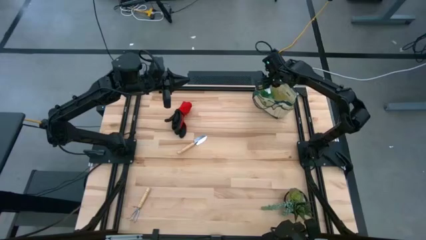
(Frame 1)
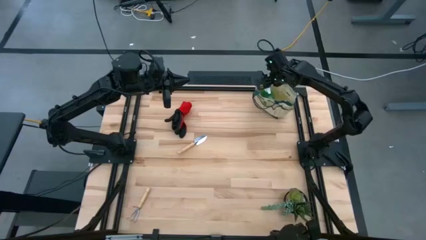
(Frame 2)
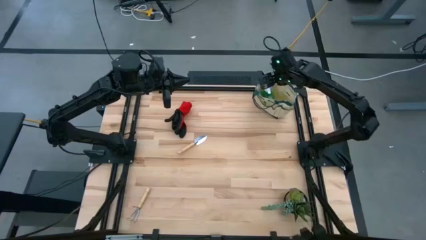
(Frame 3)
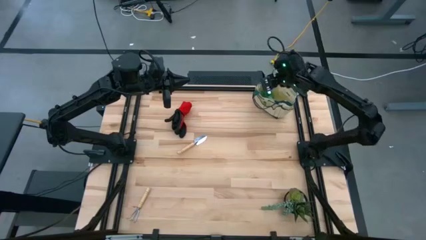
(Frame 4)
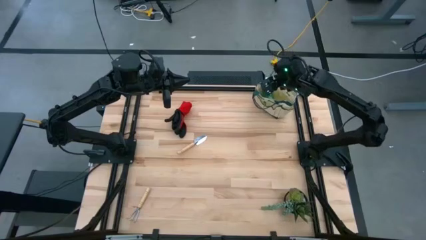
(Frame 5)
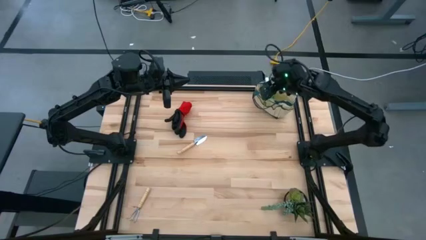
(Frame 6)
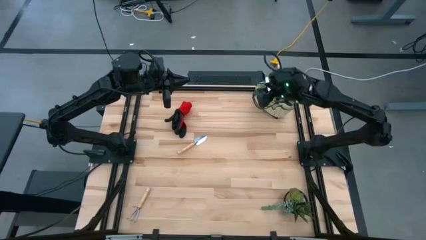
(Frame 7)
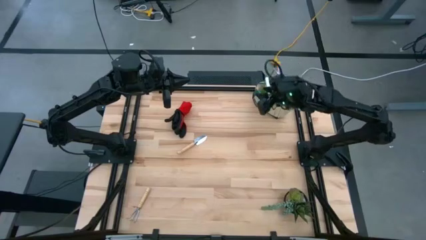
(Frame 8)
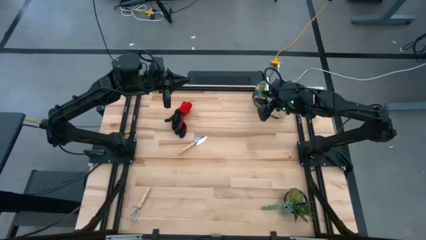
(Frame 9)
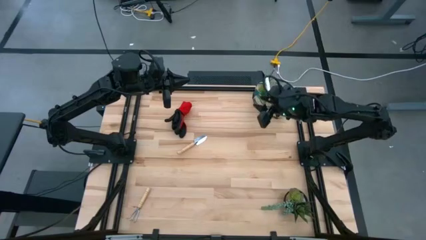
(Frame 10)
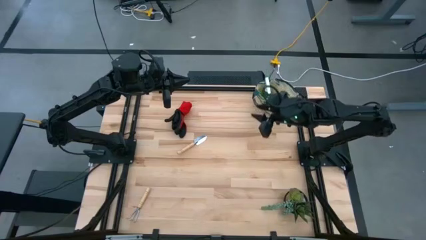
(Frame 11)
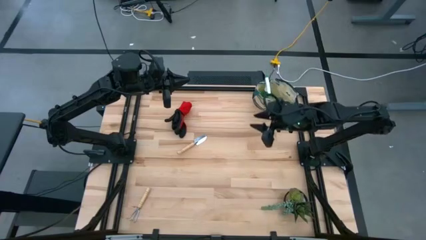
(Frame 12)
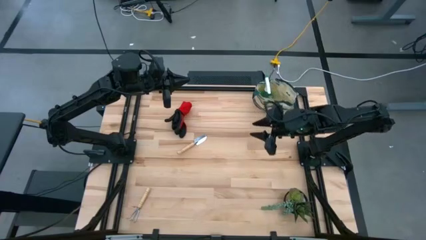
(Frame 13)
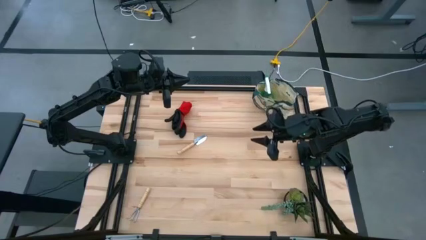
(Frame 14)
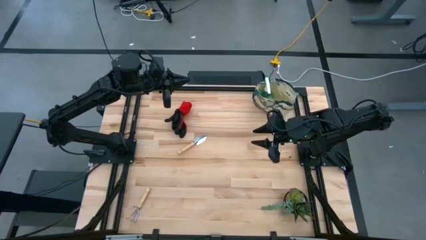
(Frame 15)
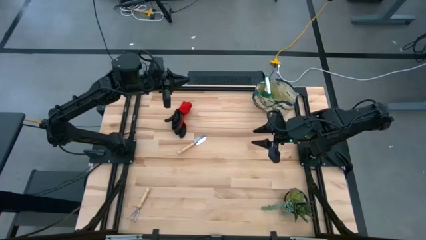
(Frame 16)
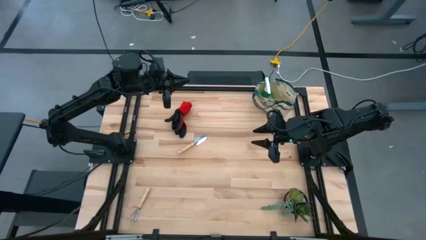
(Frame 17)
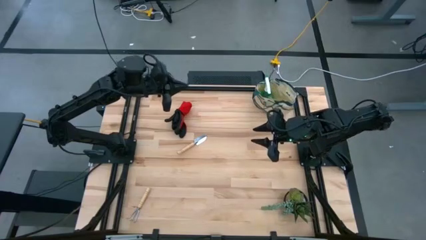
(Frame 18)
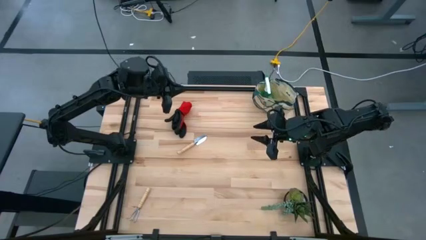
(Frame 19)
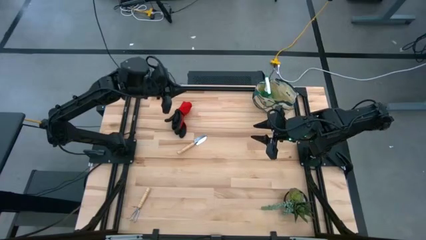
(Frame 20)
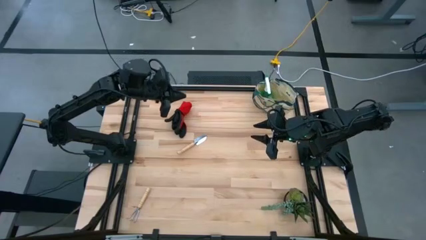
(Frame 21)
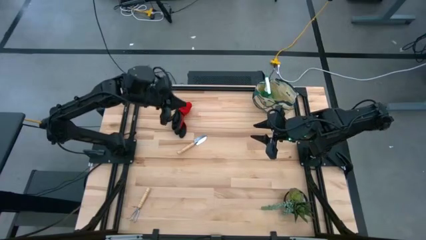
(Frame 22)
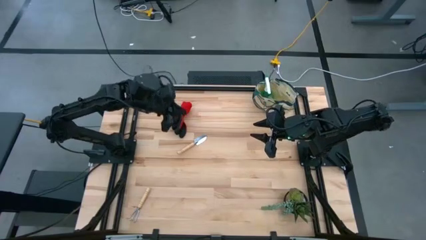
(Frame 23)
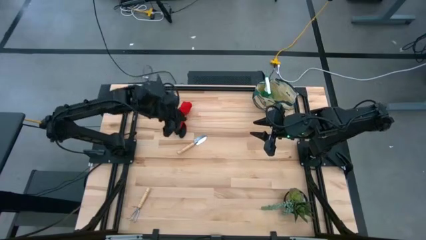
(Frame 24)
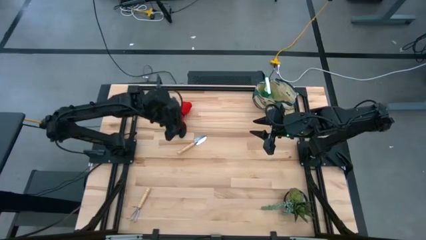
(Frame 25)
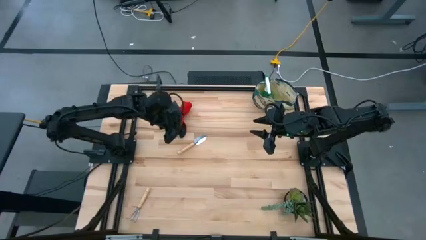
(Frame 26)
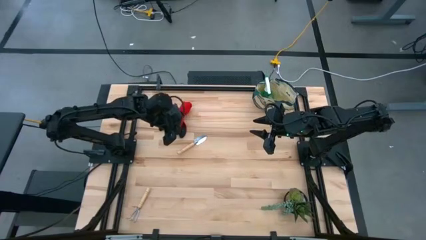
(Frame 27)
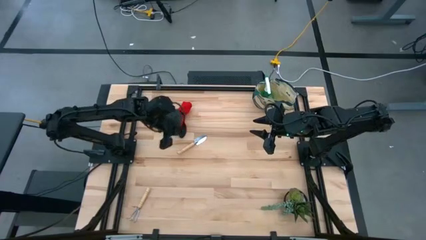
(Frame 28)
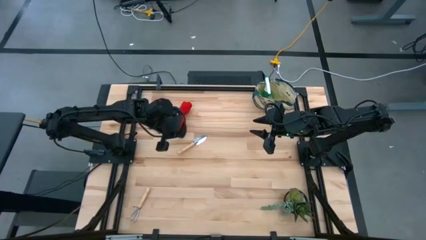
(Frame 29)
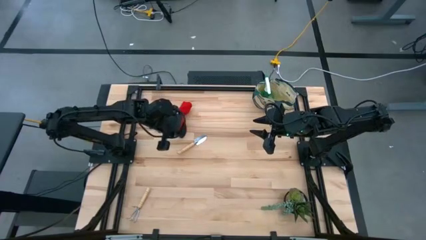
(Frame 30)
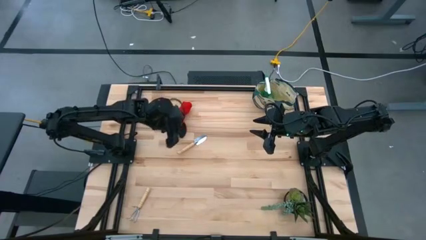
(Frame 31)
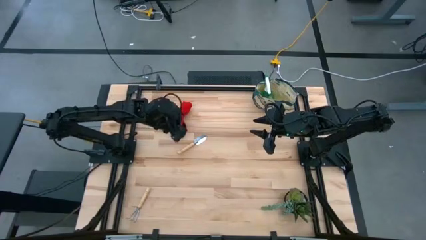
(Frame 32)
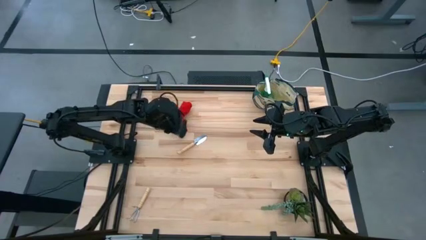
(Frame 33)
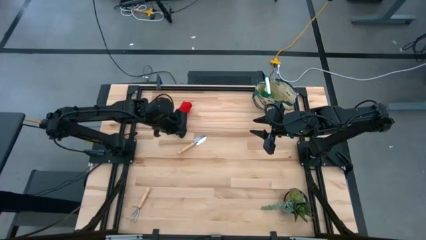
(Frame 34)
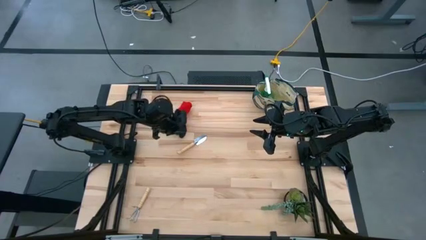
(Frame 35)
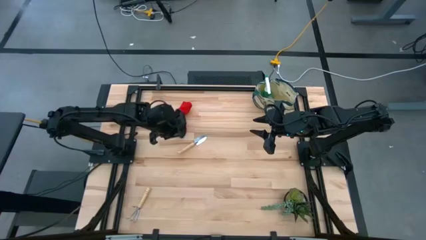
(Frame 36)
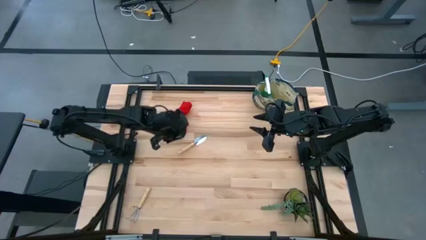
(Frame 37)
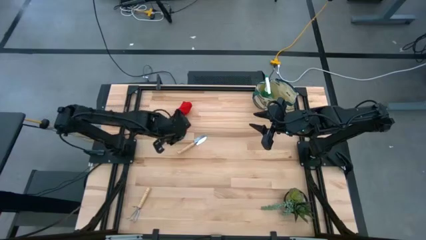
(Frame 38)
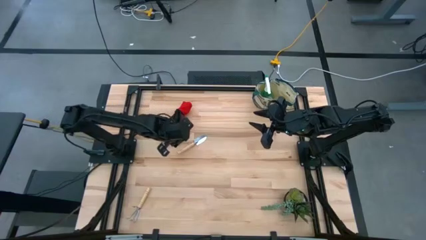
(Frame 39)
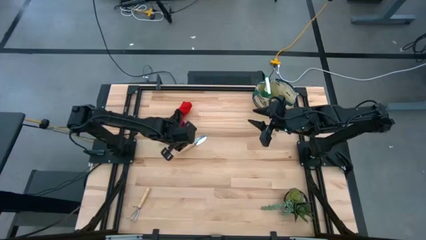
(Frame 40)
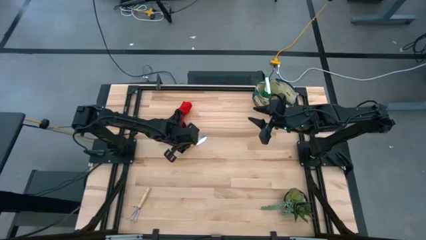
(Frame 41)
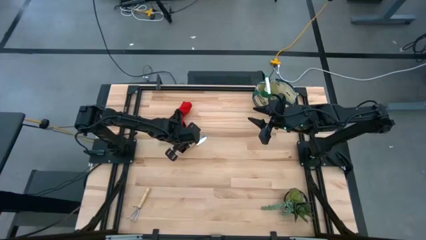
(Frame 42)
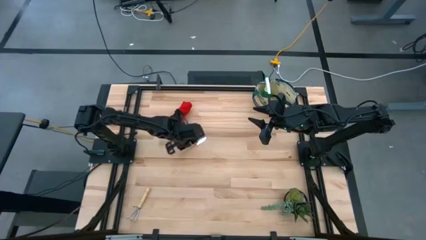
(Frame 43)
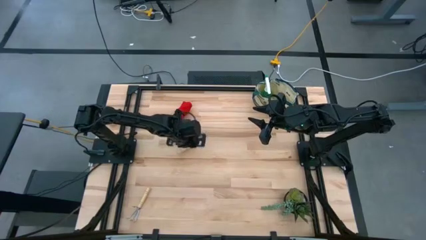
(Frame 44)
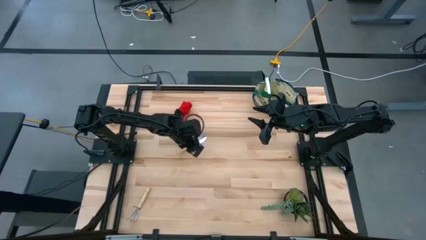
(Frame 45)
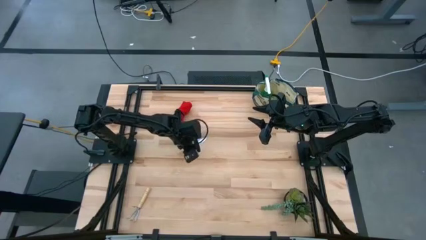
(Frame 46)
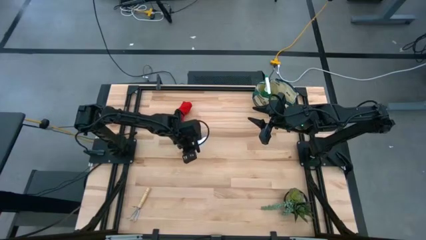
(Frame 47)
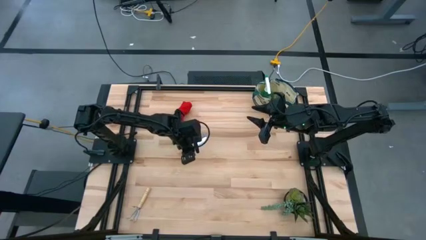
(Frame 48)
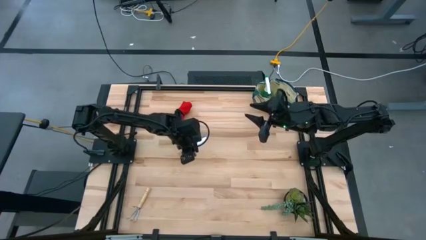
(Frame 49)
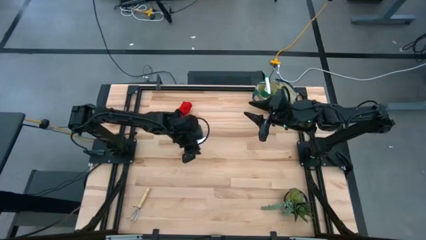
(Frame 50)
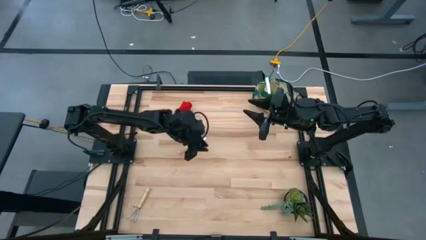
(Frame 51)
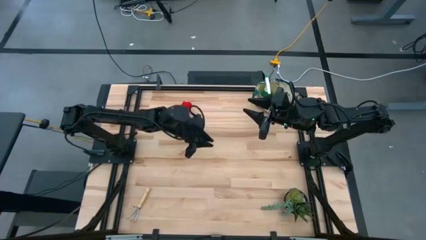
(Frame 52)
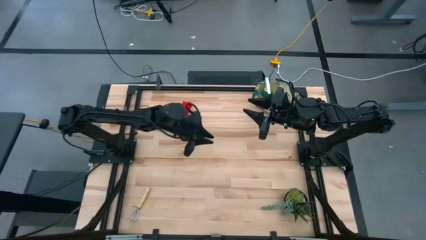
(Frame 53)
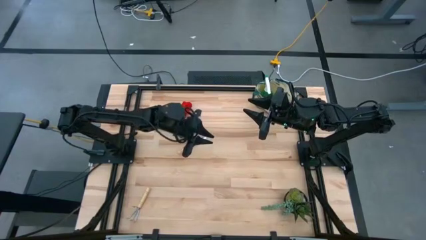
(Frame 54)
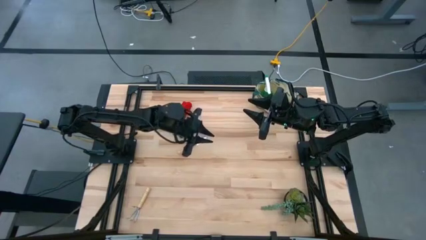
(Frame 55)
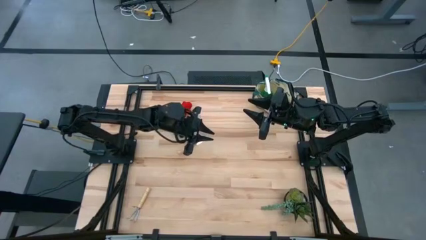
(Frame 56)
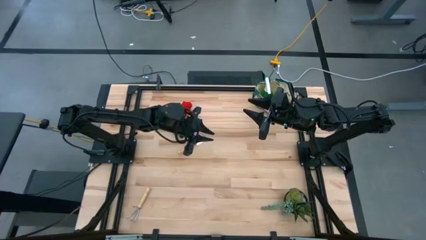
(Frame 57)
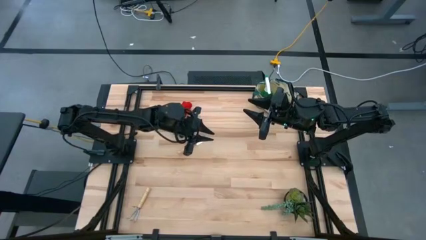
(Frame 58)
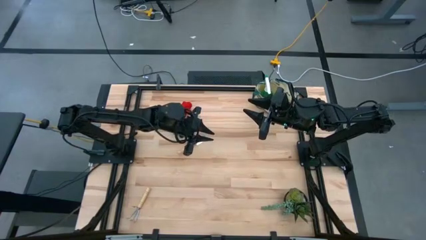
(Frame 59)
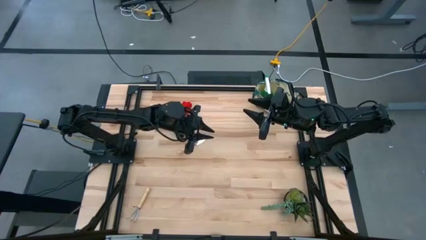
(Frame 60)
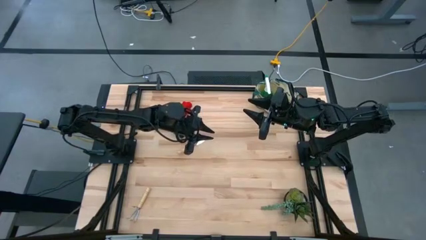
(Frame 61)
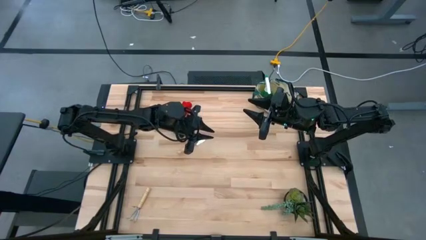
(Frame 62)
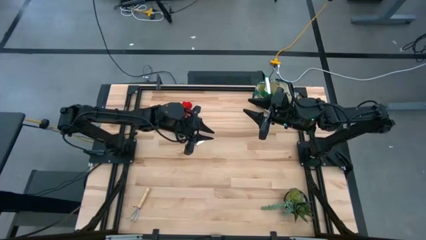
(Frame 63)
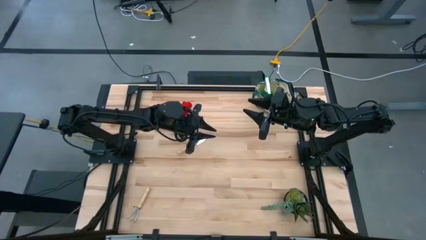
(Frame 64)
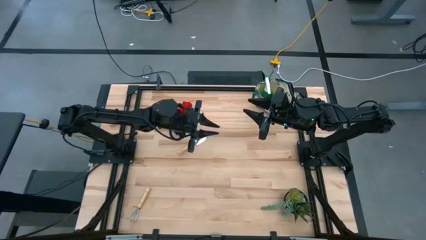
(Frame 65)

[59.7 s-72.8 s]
Task: Pick & Place Garden tools in Gardening bag
Put the brown trowel into the gardening bag

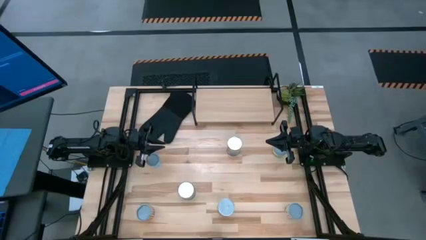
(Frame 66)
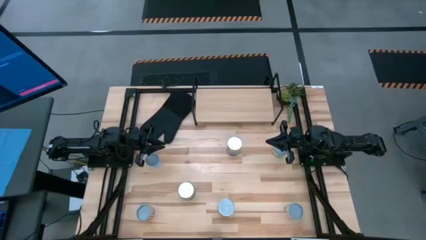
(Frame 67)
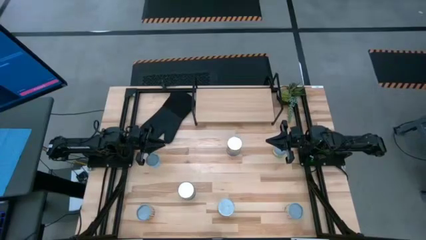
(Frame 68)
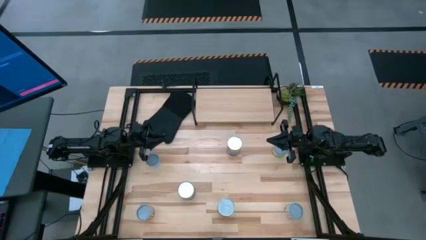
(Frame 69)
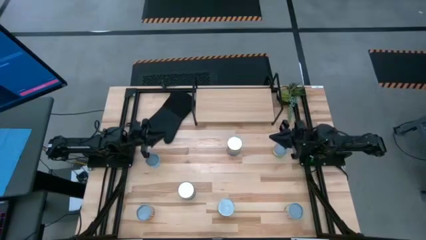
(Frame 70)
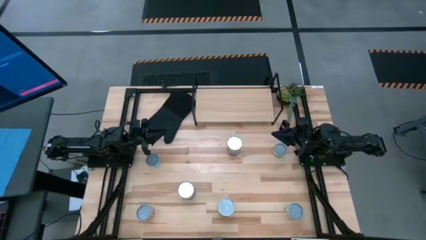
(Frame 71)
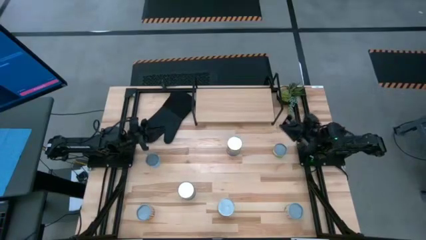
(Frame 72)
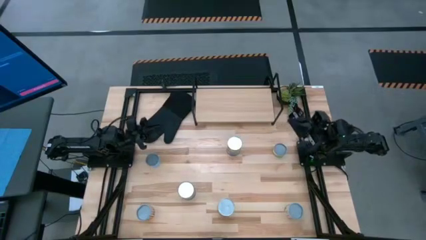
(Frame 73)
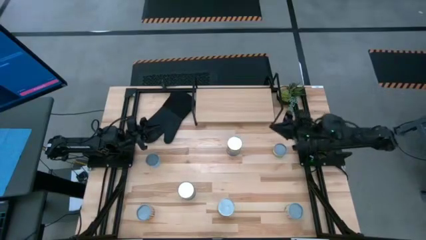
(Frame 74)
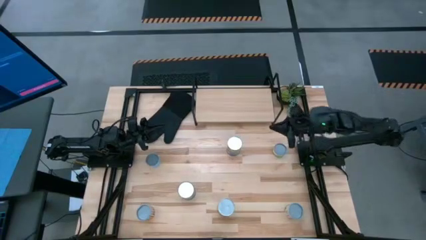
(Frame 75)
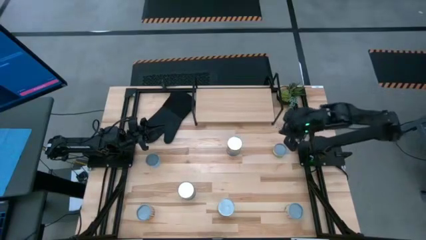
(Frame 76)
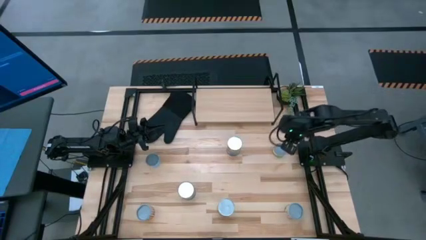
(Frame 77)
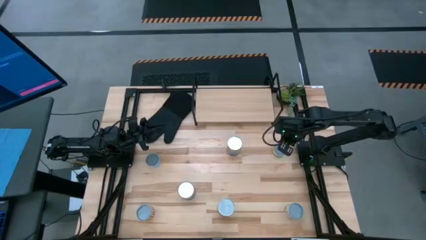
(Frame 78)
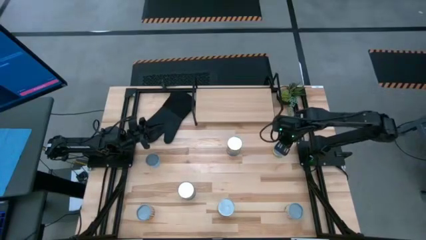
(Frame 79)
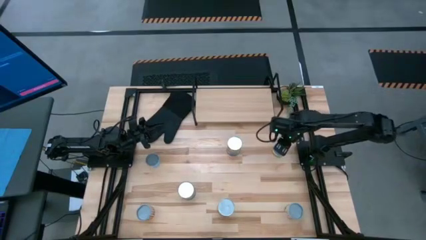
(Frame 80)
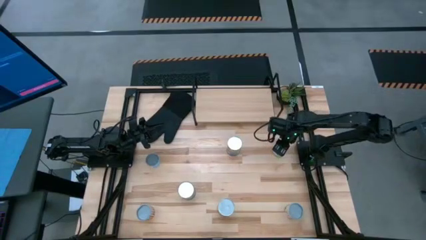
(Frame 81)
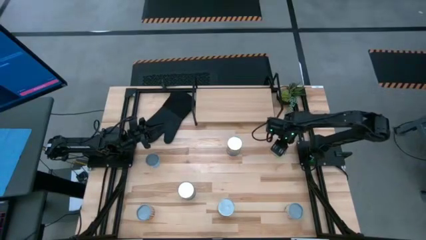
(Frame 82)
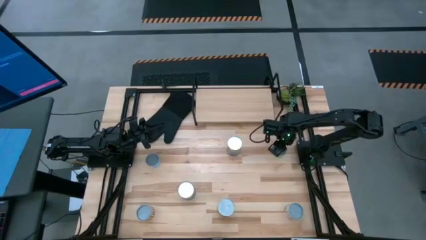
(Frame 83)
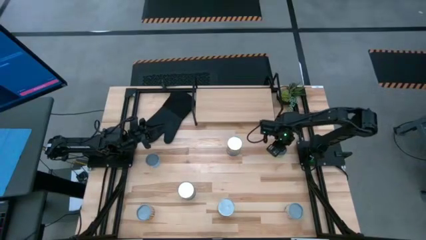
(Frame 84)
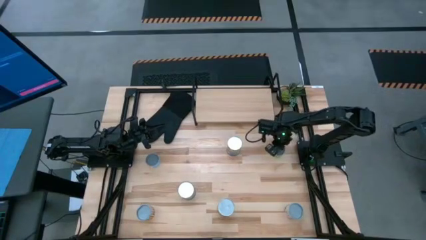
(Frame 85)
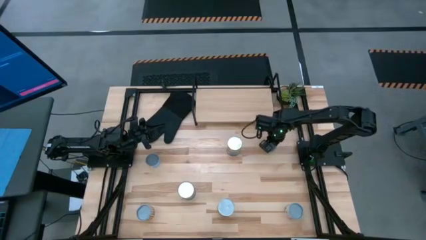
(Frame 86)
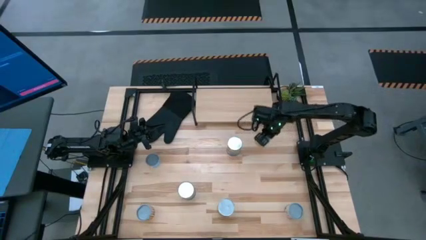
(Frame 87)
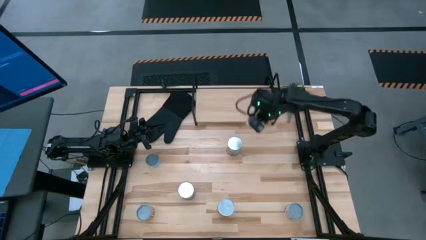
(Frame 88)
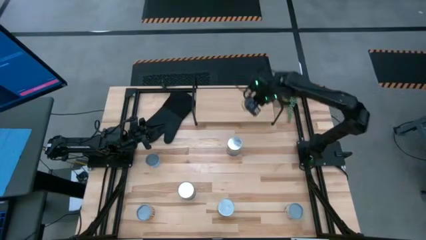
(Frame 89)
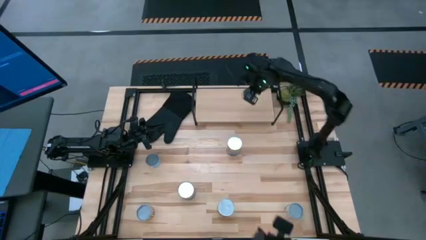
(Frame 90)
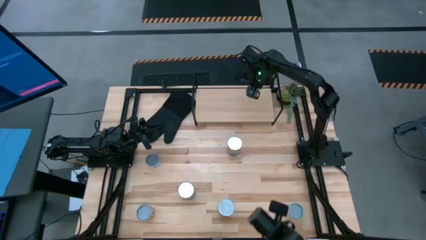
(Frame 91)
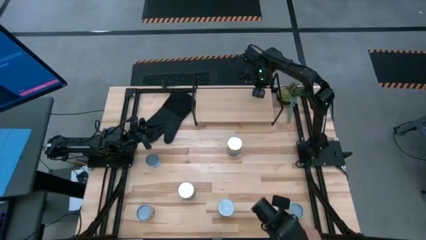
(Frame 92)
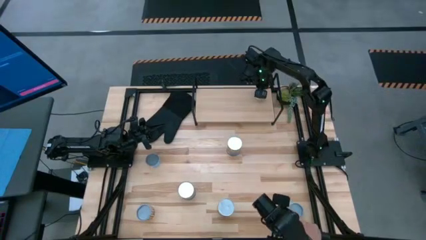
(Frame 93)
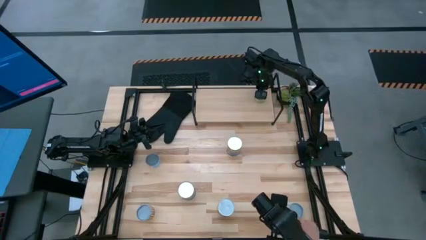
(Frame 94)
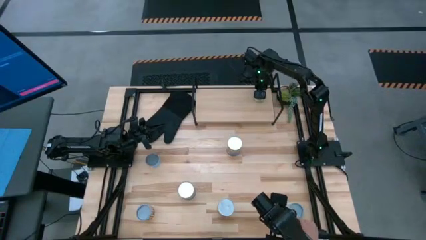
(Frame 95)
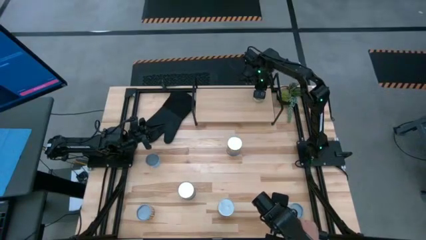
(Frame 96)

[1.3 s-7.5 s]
Task: Pick and place cans onto a shelf
Put the canned mushroom on the shelf
